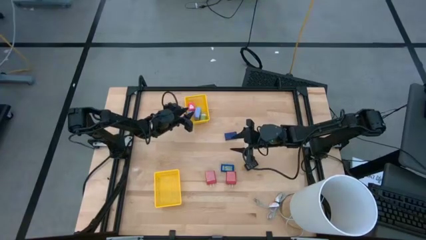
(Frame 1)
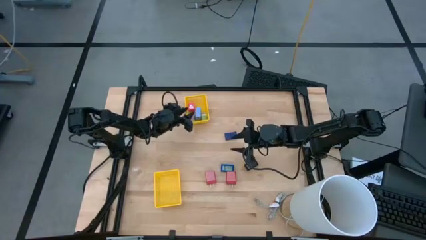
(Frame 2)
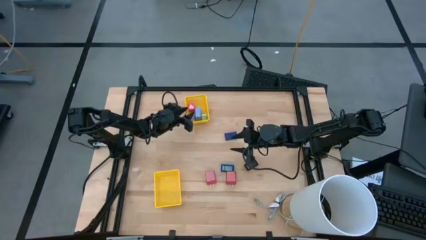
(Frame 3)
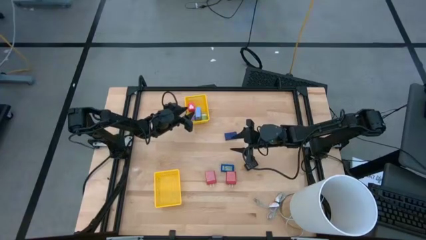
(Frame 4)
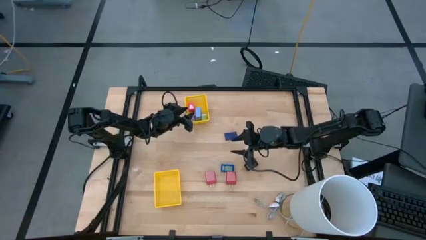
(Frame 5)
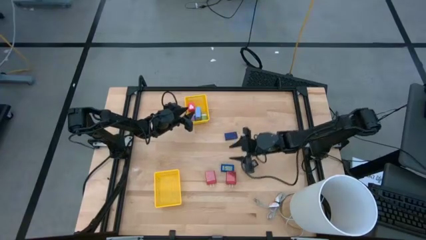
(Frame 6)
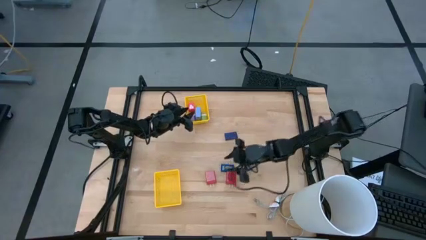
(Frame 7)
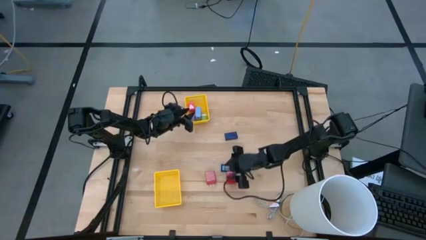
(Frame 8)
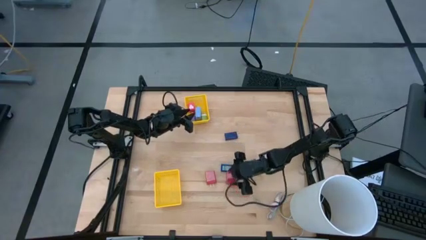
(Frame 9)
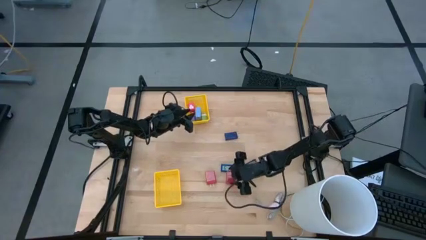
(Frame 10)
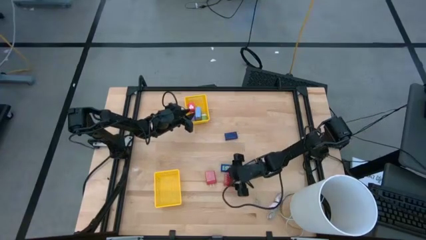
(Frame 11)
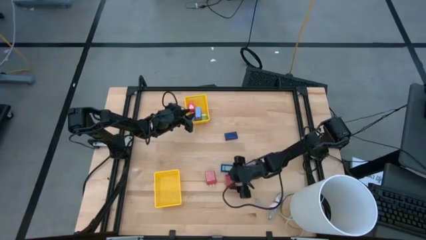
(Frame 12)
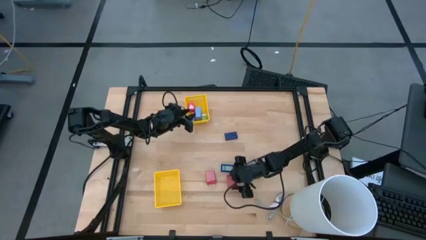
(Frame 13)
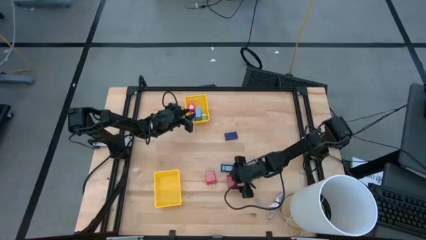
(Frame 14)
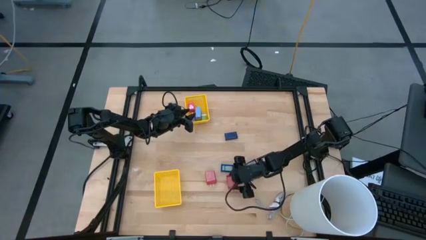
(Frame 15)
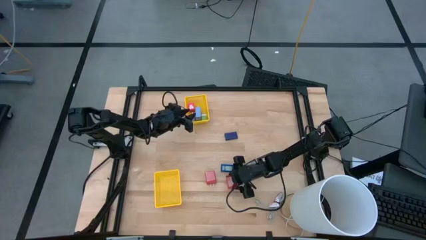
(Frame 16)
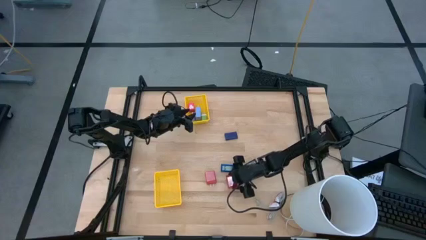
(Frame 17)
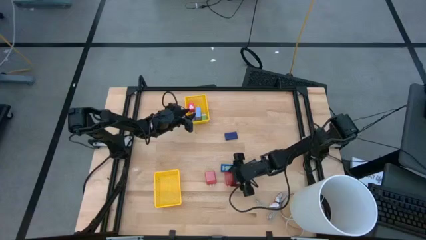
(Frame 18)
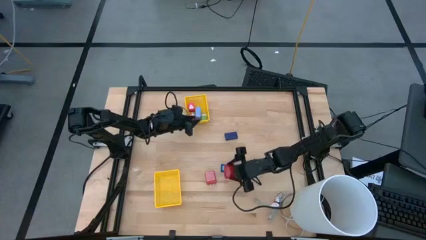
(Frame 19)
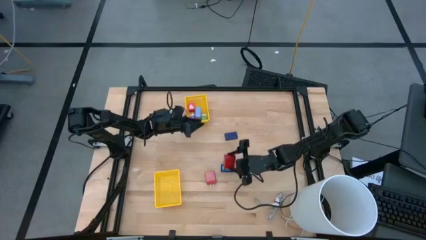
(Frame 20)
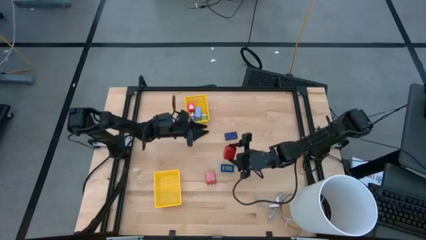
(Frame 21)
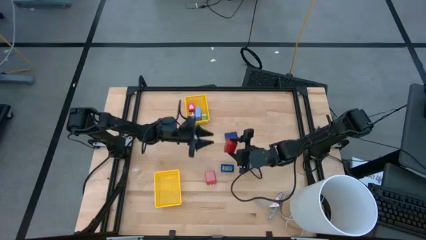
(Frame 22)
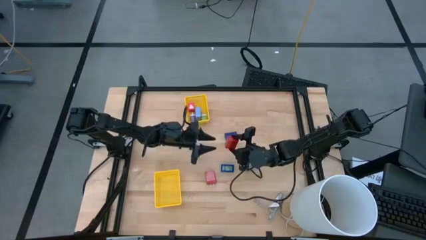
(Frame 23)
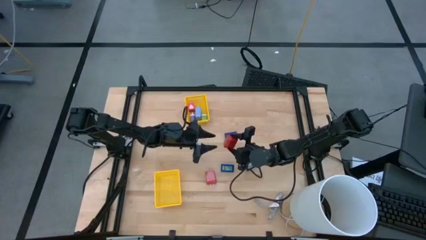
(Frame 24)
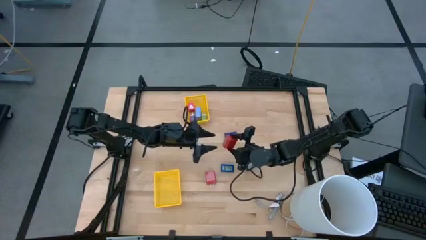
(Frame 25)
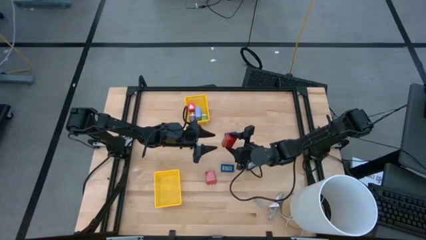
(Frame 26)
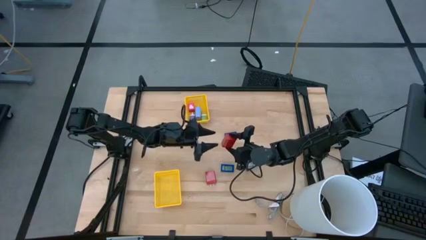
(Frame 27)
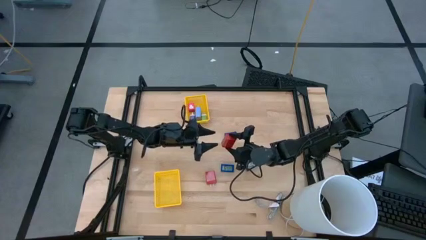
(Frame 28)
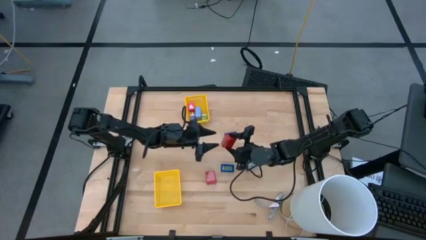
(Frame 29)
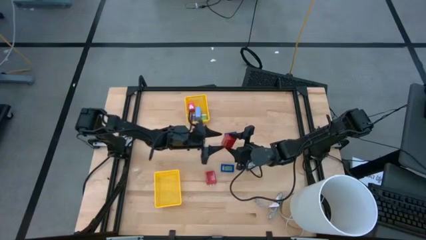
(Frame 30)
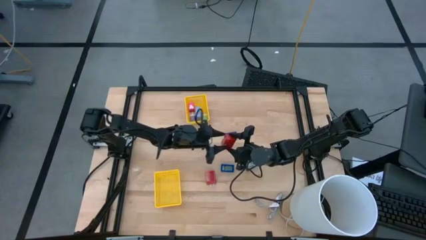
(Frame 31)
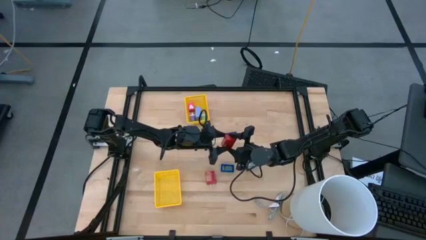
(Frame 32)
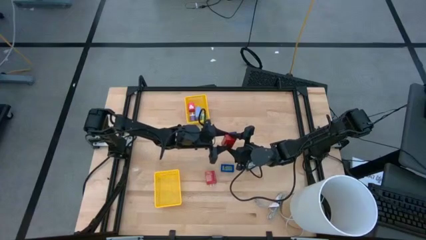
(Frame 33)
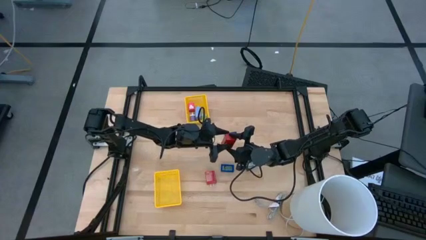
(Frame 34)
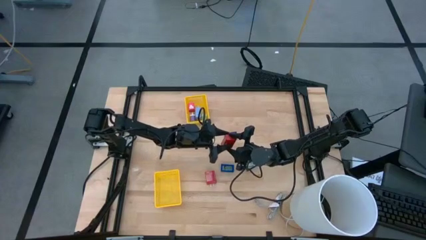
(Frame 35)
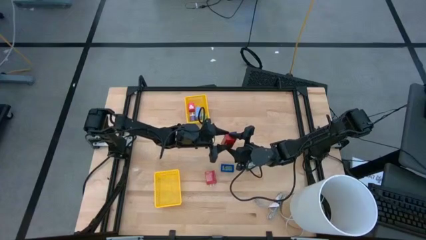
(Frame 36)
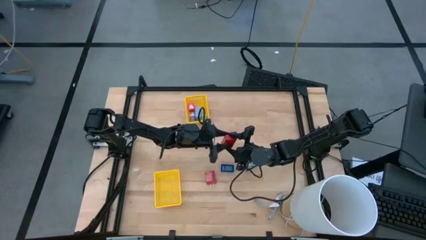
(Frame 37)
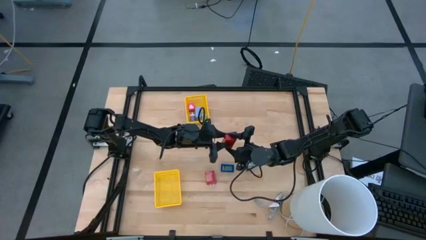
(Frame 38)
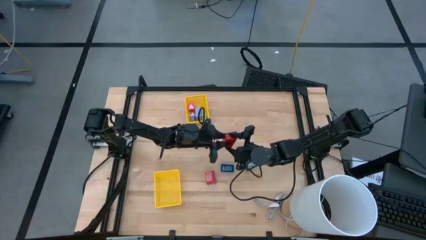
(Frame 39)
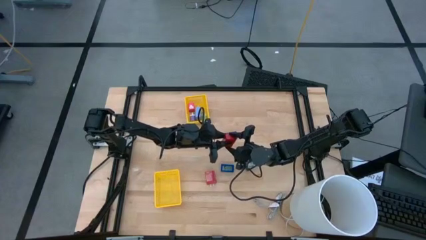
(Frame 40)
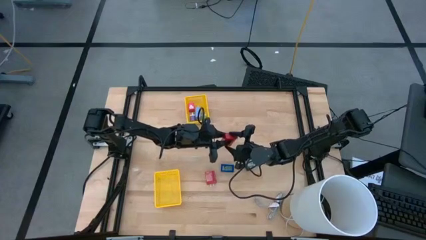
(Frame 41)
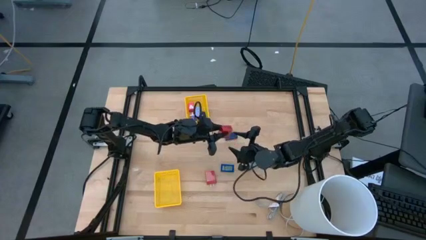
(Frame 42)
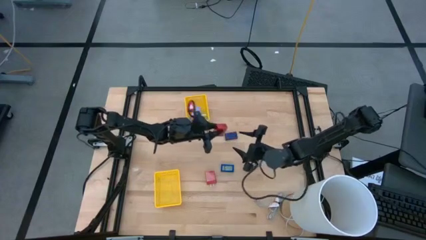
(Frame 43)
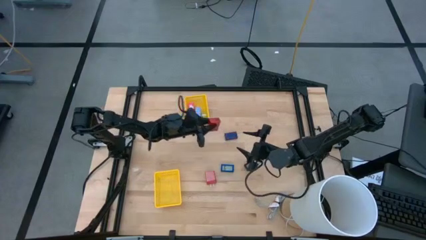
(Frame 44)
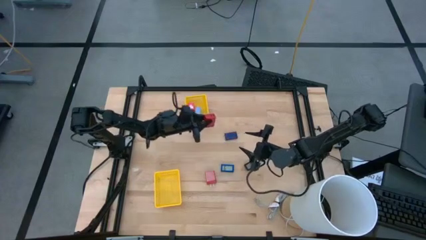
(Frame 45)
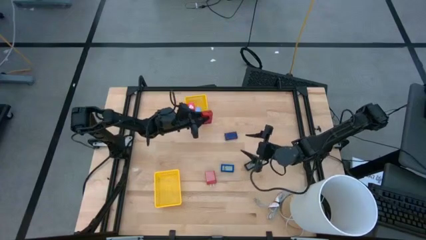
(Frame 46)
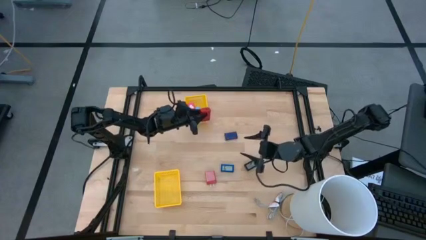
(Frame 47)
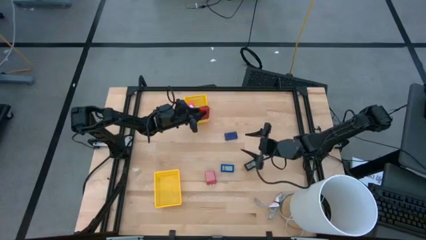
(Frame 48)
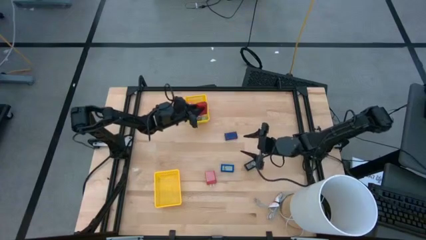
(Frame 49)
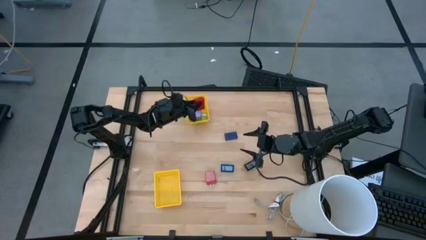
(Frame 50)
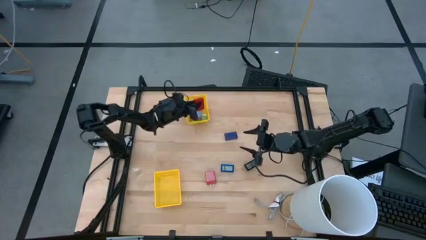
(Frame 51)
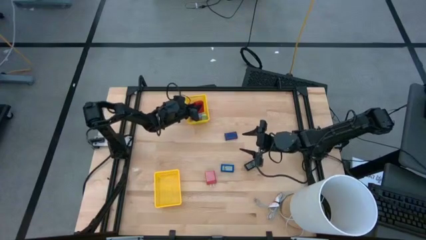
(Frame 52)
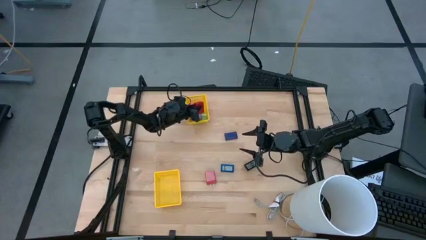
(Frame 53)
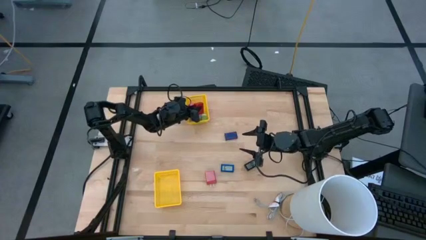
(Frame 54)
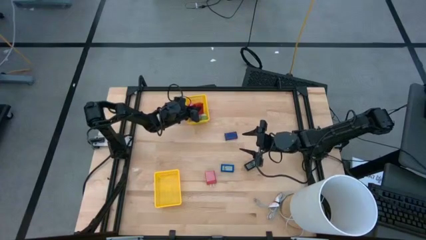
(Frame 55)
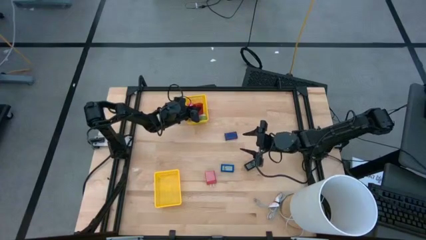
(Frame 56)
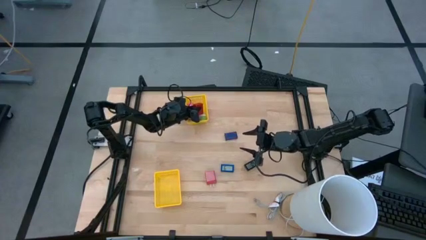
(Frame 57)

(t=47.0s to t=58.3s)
Task: Pick & Place Office items
Put right red charger adapter into the top yellow bin

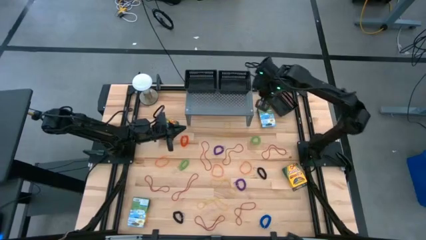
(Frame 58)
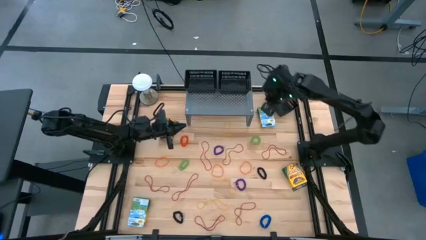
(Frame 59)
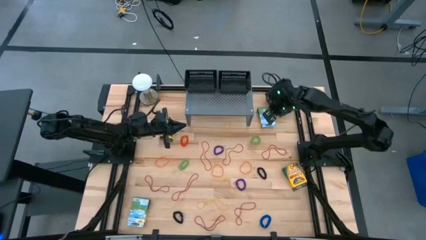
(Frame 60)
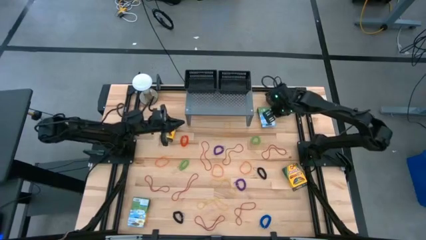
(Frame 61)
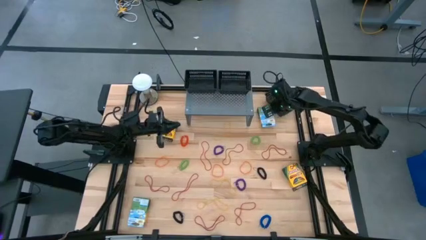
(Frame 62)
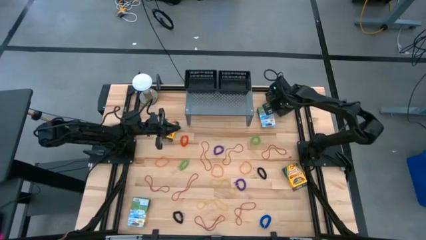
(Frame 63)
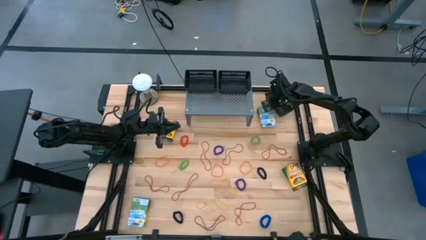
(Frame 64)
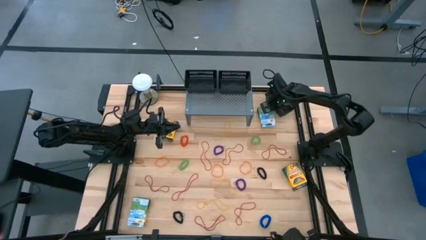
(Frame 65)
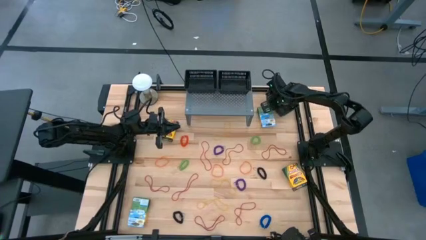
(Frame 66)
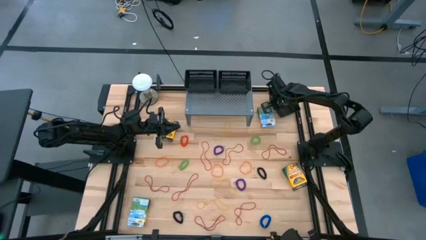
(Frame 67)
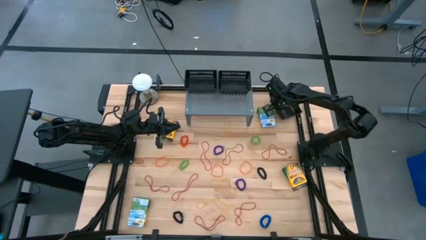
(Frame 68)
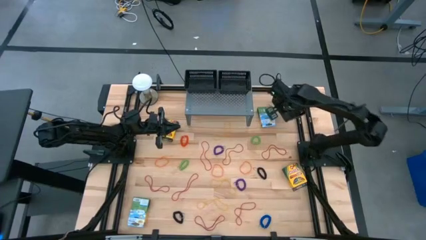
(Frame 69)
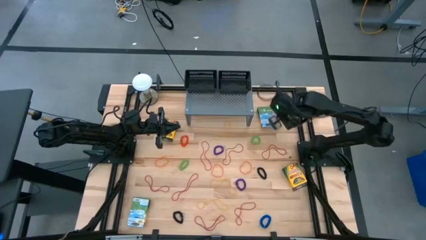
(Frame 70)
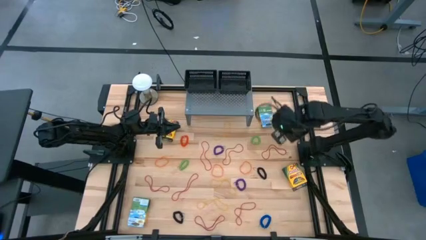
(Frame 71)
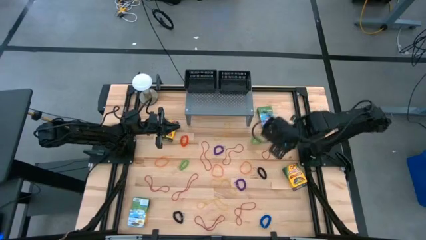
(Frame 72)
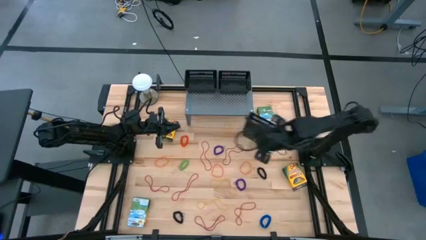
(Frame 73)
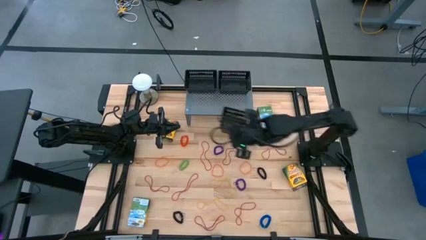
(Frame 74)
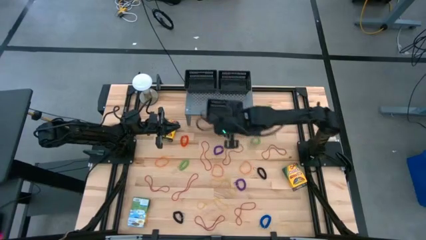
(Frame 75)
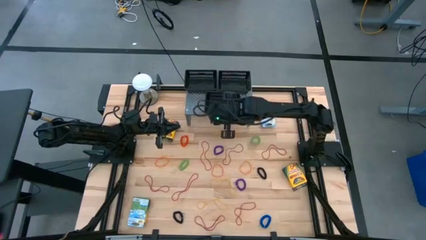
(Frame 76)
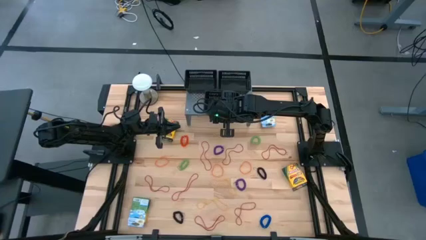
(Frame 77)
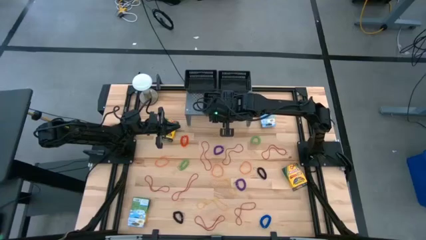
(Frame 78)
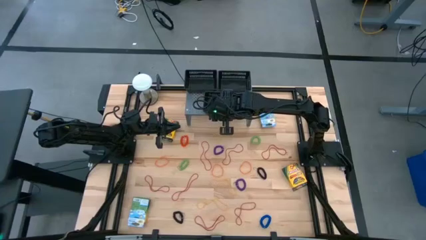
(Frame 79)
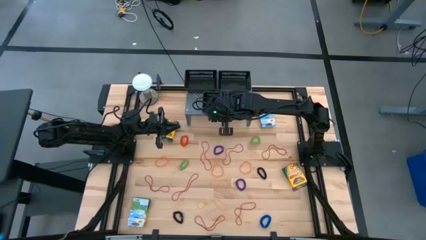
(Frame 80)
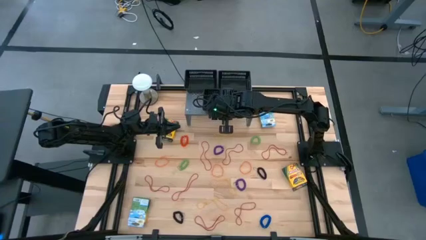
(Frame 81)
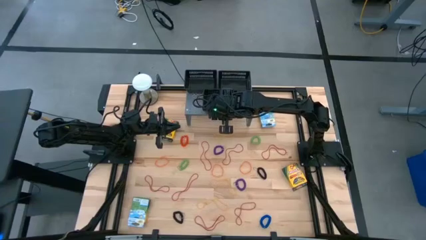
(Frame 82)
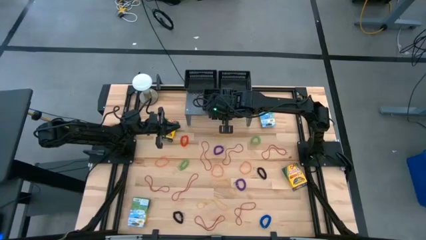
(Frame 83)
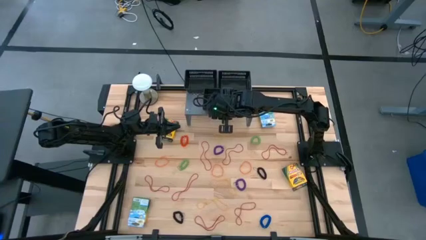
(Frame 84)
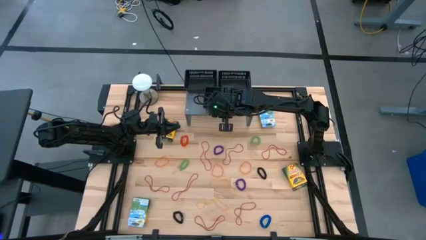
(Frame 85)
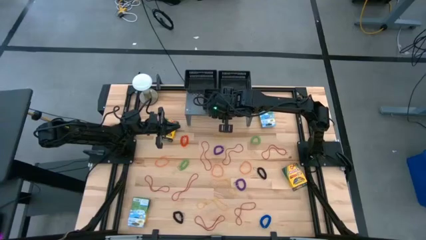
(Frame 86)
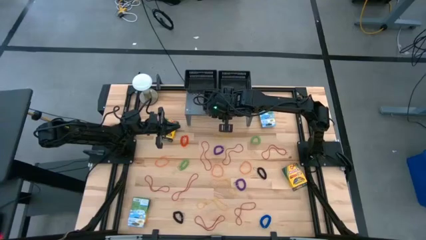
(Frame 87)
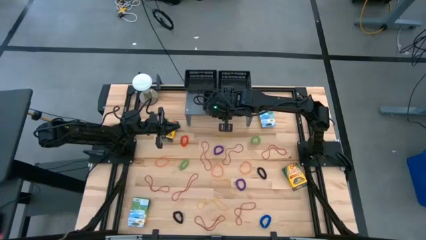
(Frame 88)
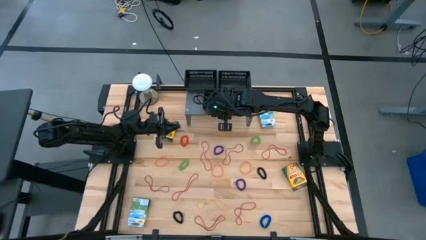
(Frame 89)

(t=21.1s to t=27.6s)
Task: Pick & Place Office Desk Supplies
Put the black basket on the shelf
